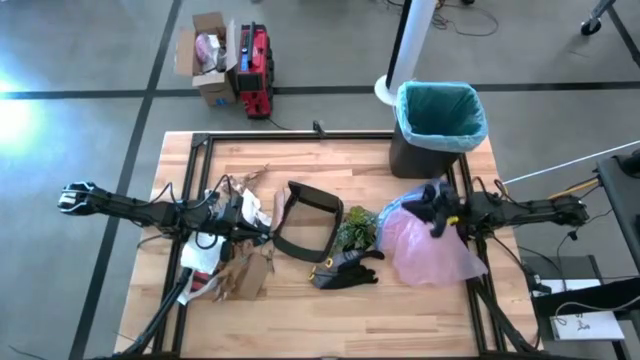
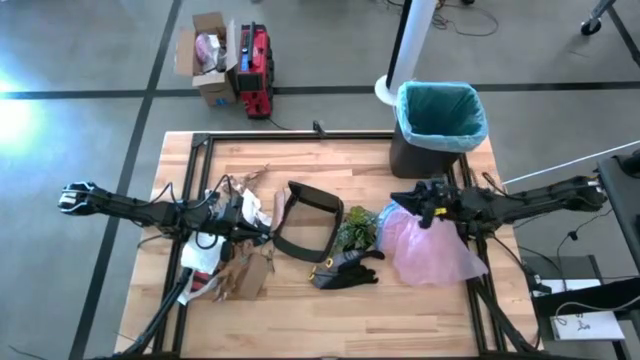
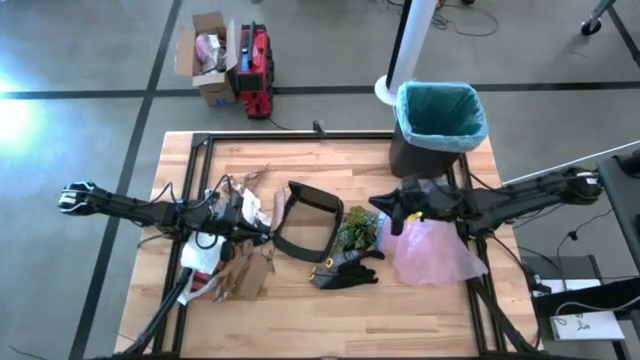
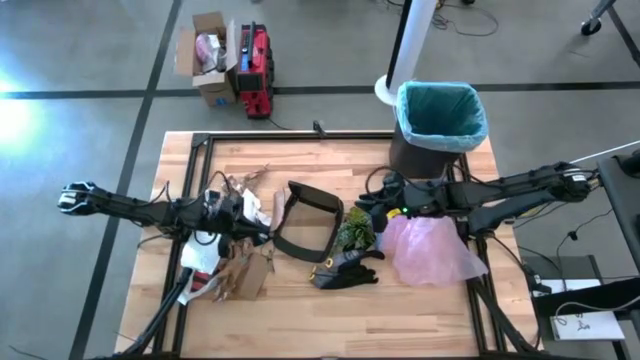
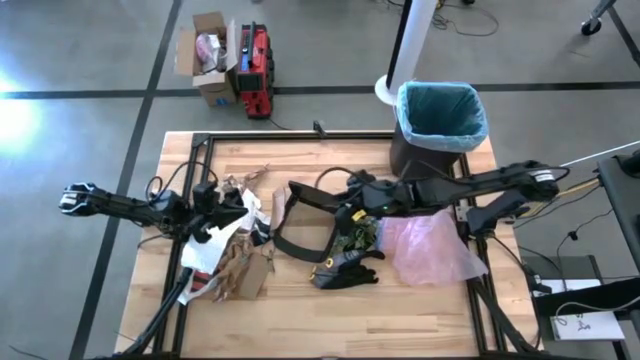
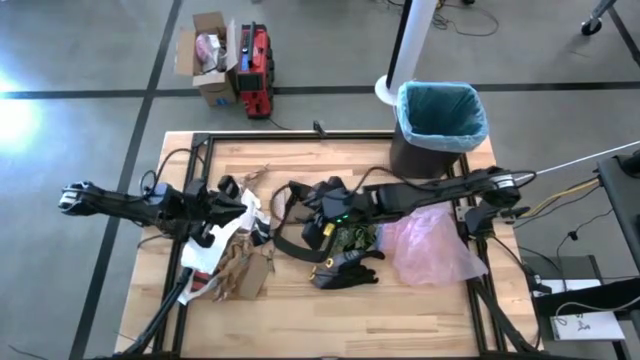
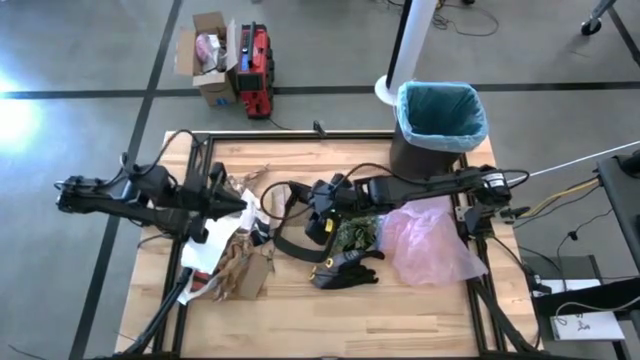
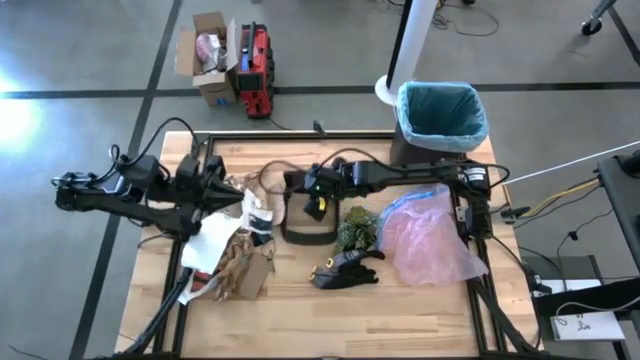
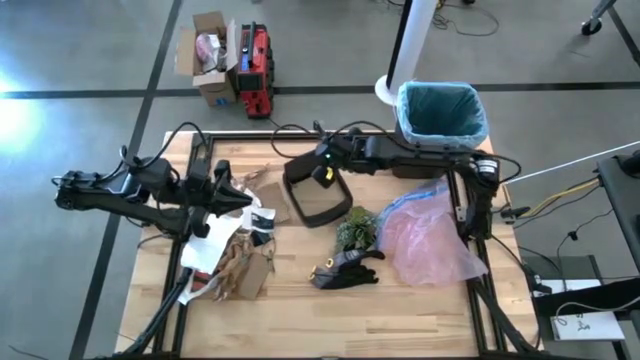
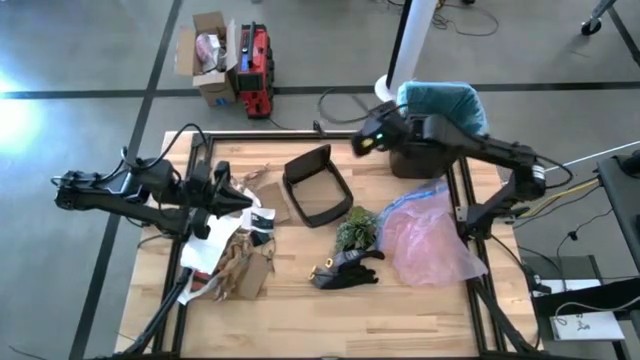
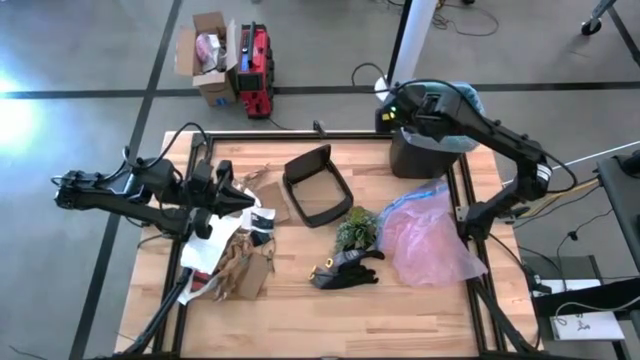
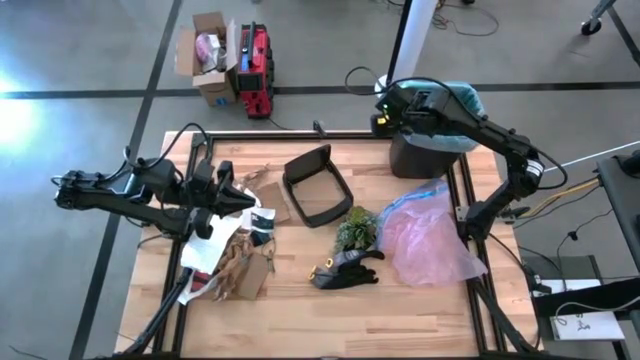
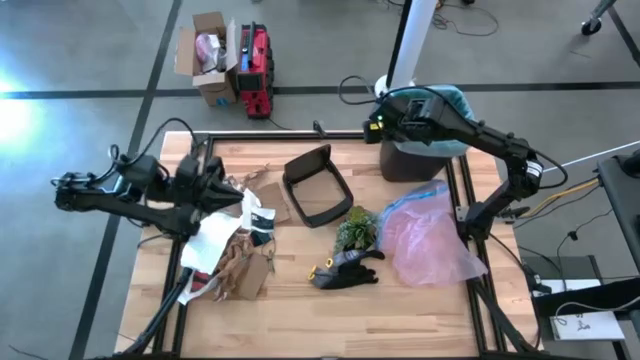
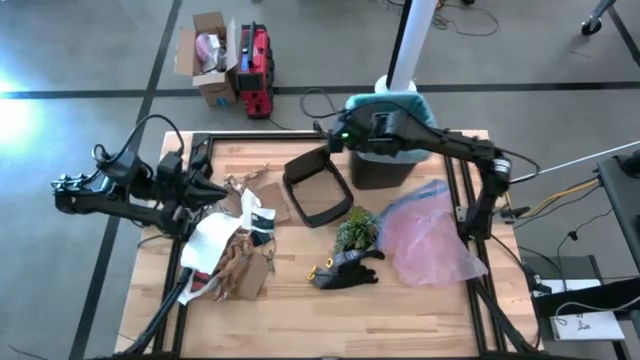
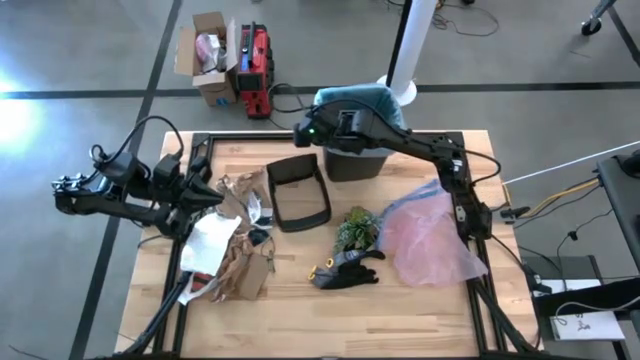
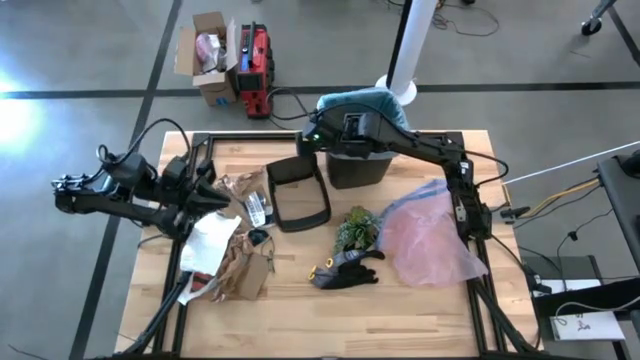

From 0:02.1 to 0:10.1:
Task: place trash/remove bag and relplace
Move the trash bin to the middle top of the table

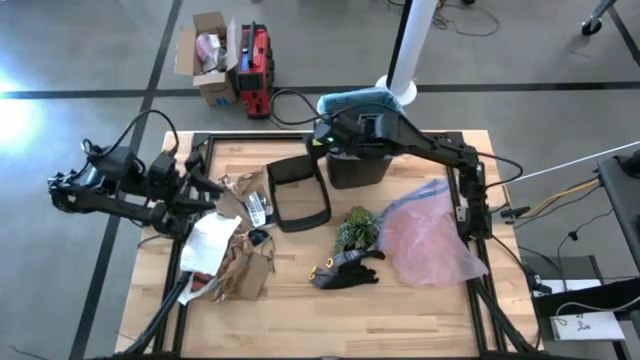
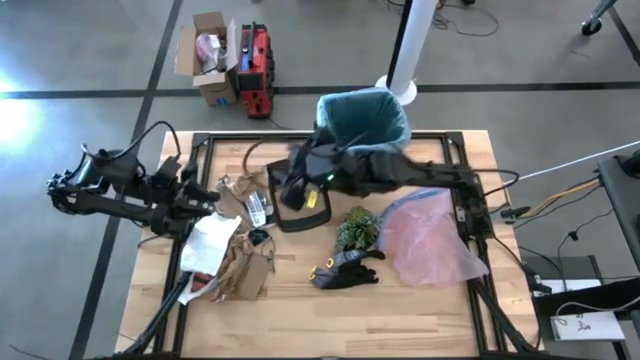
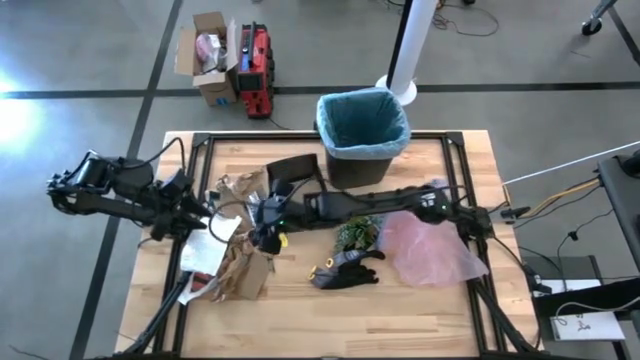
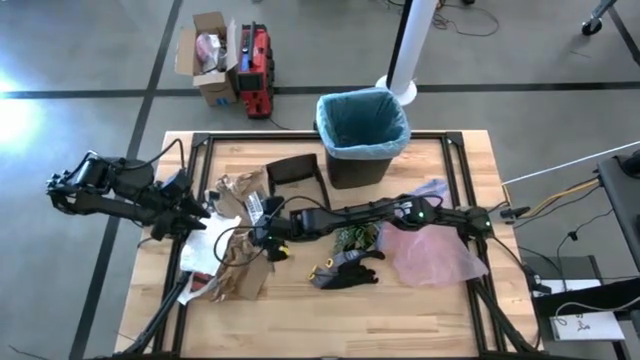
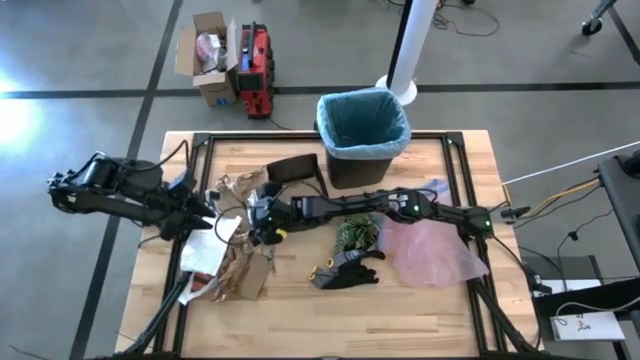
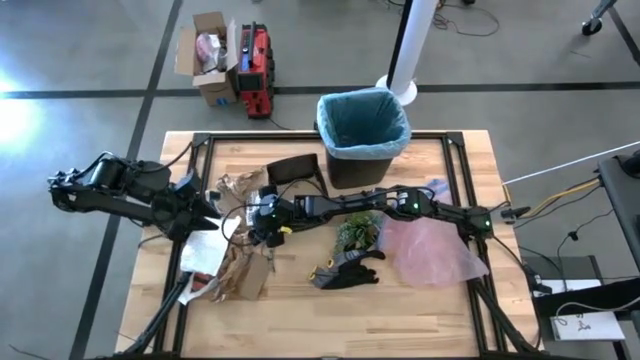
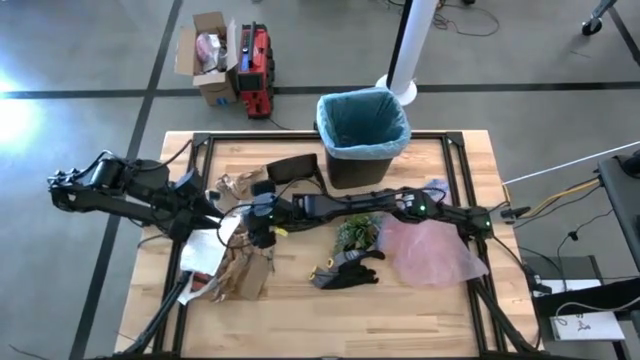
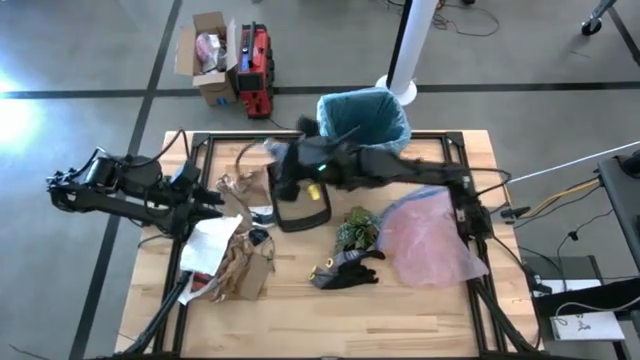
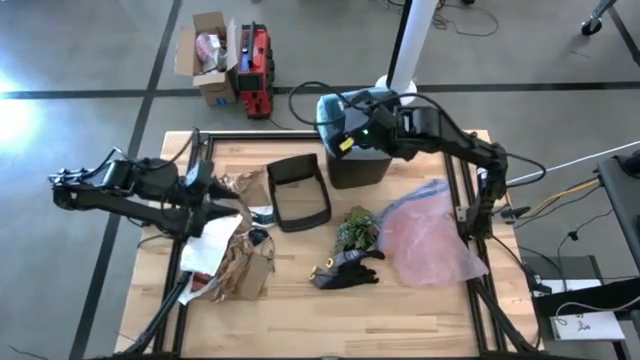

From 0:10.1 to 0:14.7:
Put the white paper into the trash bin

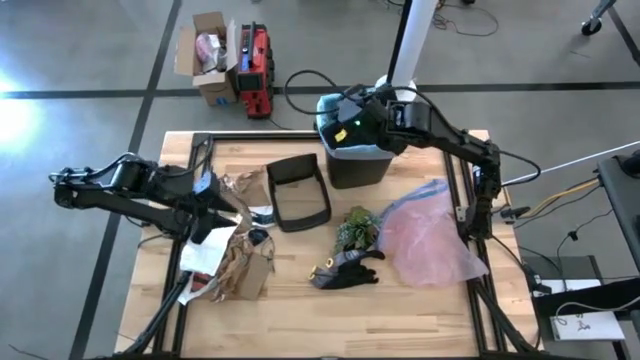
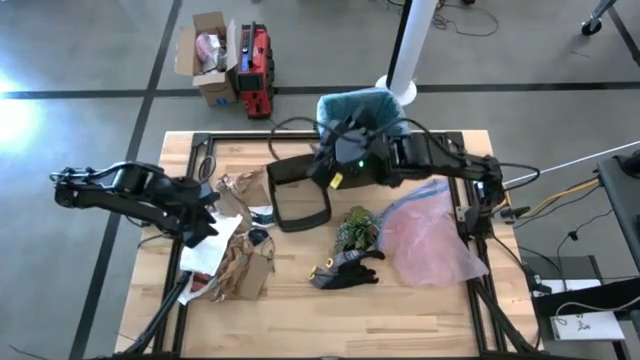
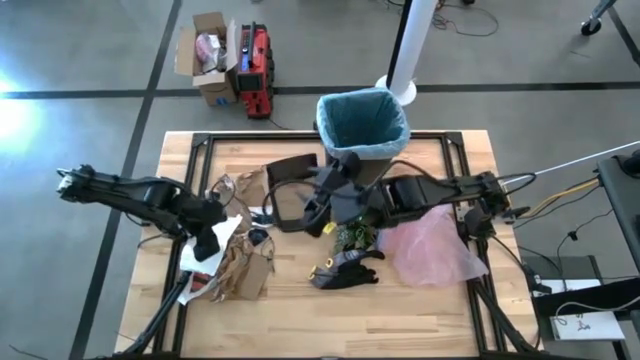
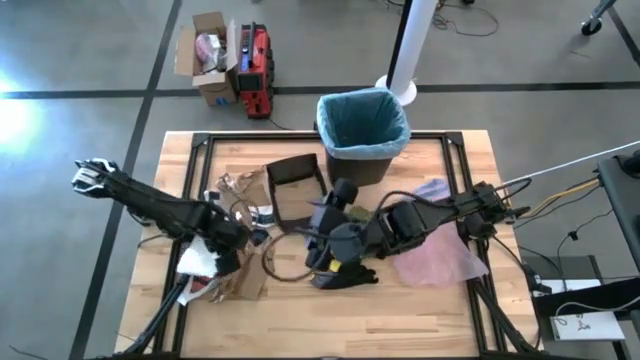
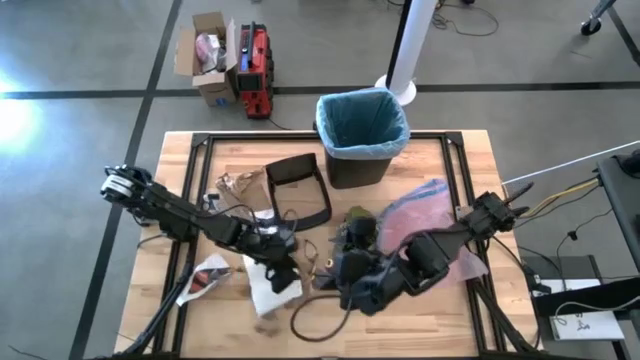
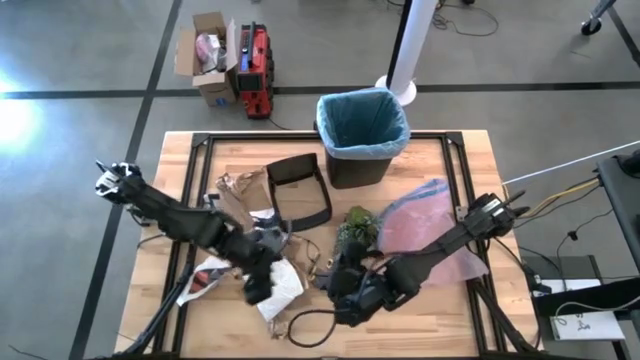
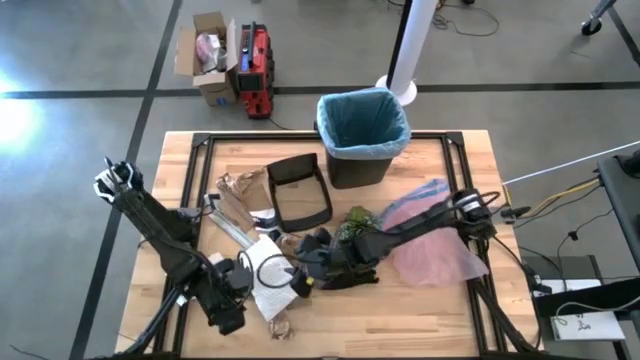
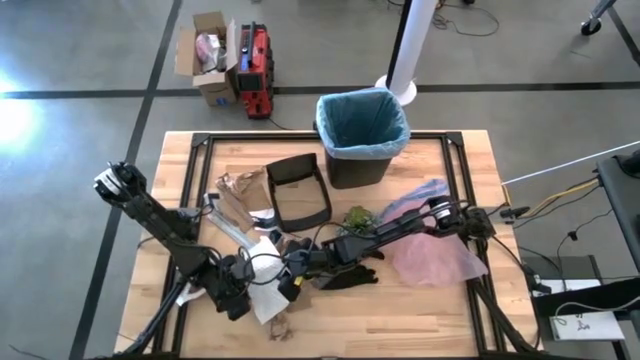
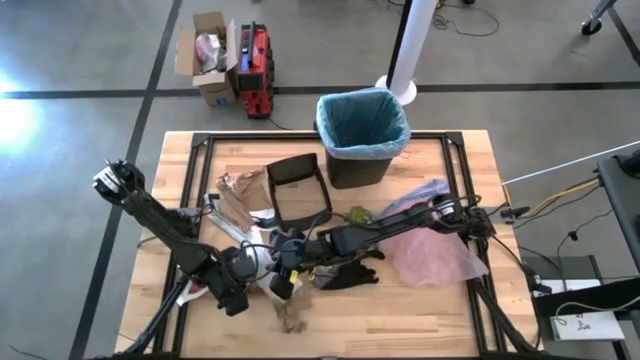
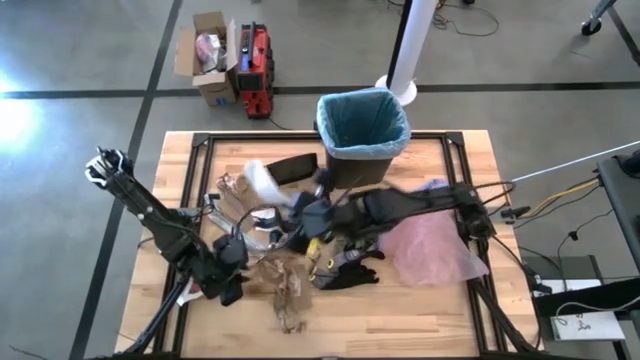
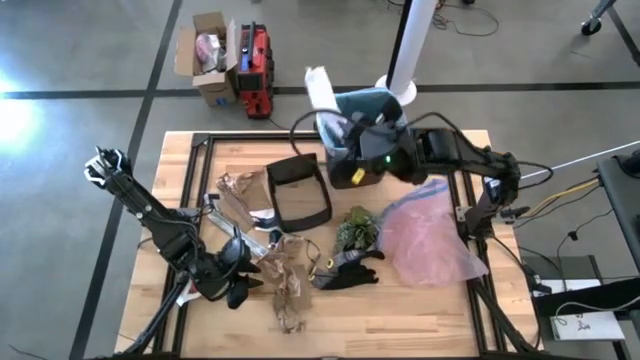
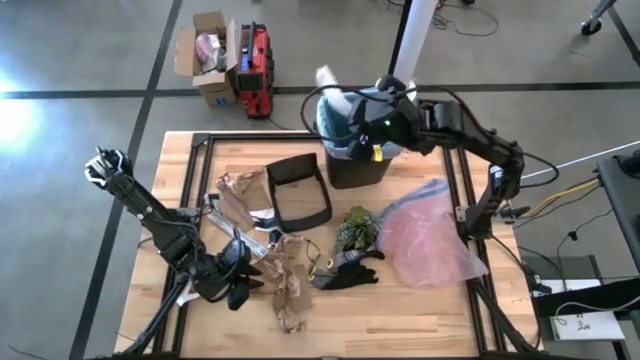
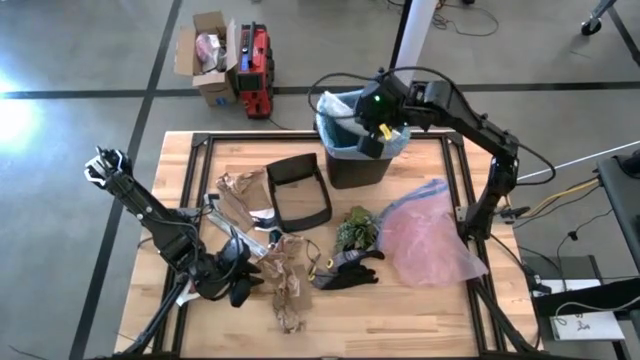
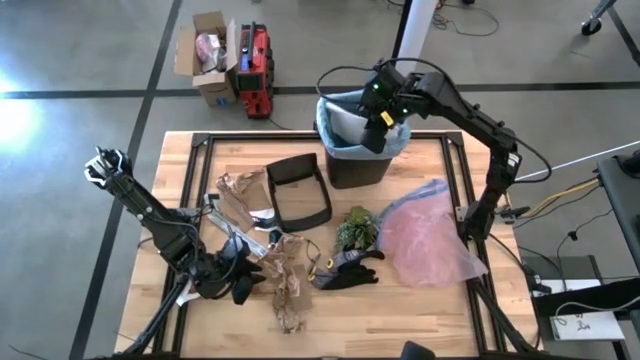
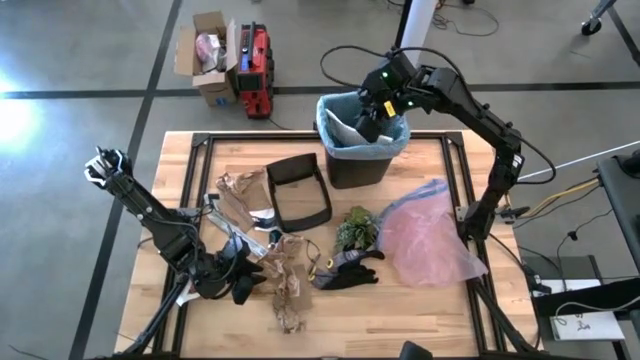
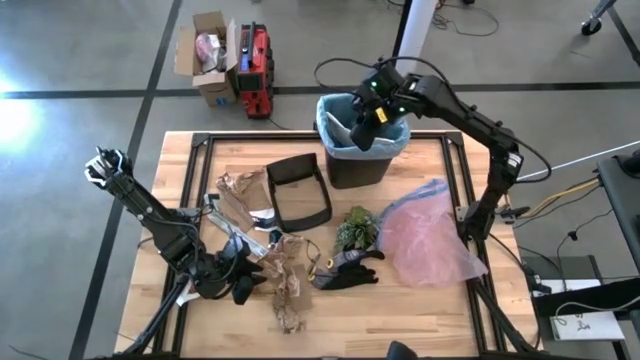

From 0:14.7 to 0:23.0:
Put the bubble wrap into the trash bin
